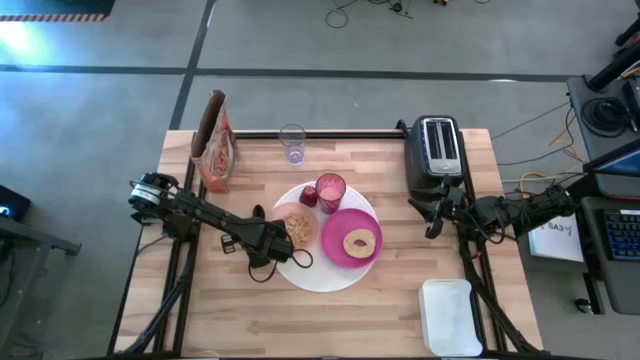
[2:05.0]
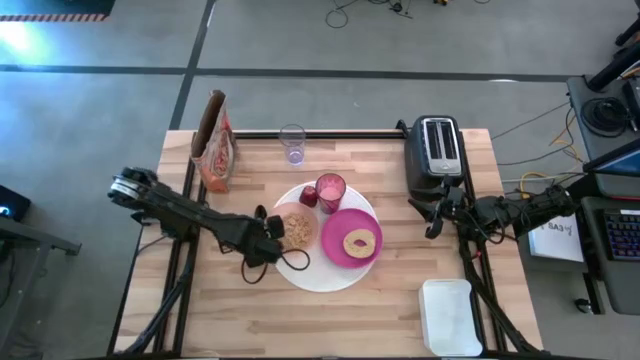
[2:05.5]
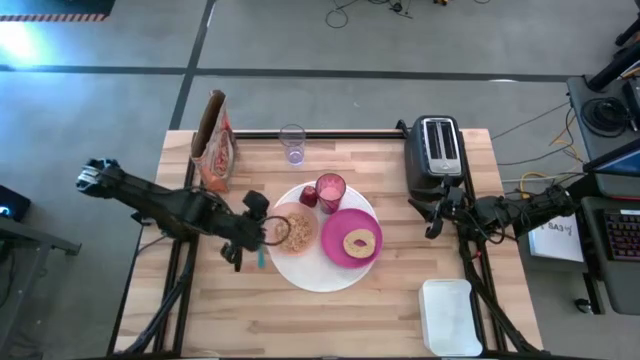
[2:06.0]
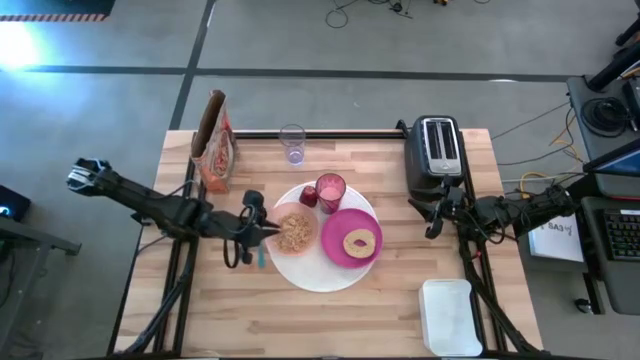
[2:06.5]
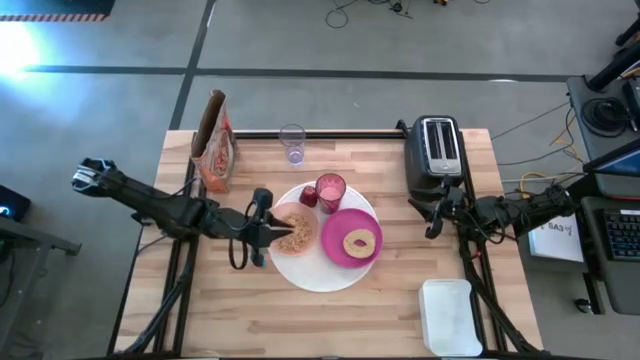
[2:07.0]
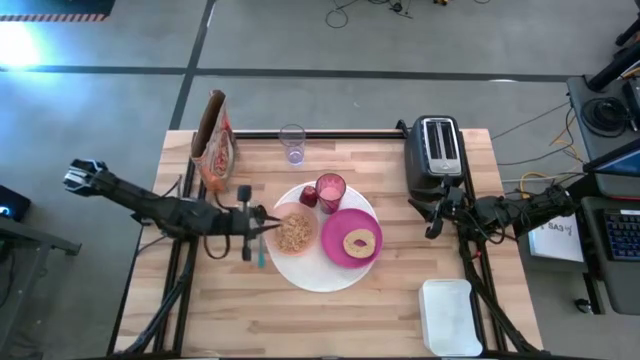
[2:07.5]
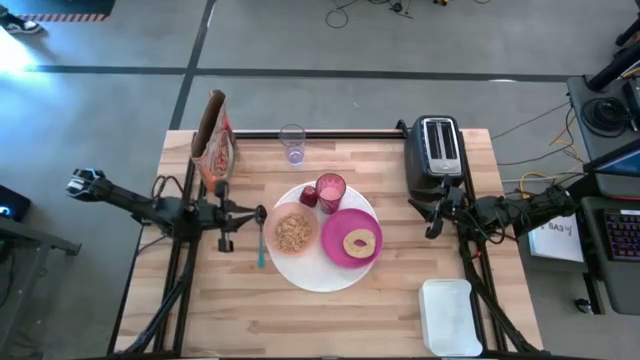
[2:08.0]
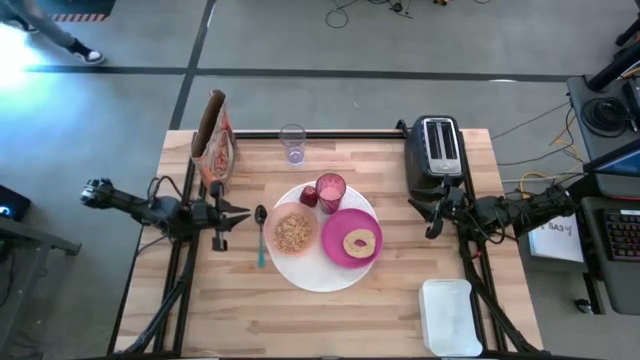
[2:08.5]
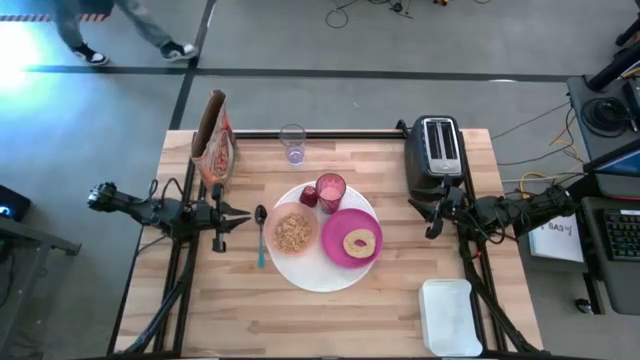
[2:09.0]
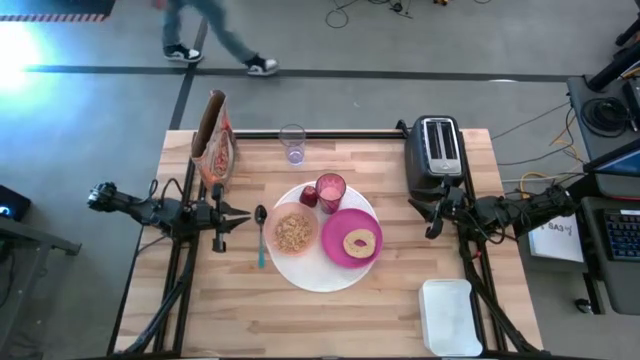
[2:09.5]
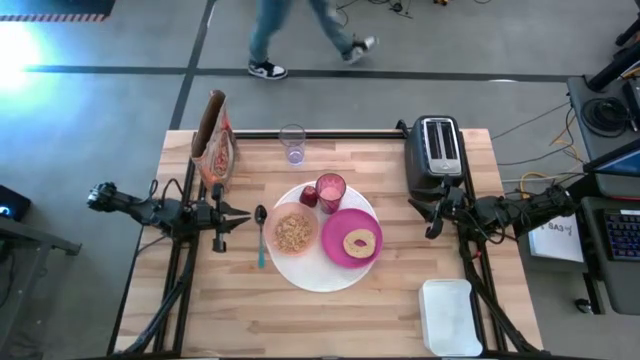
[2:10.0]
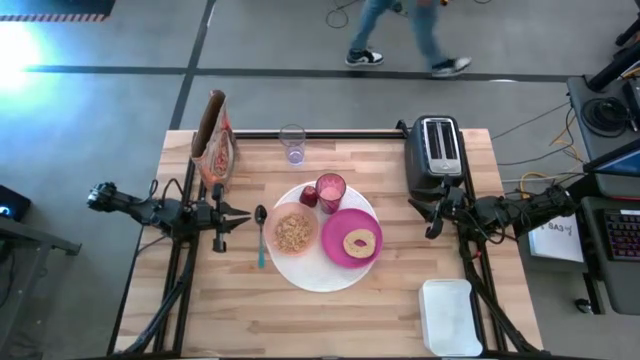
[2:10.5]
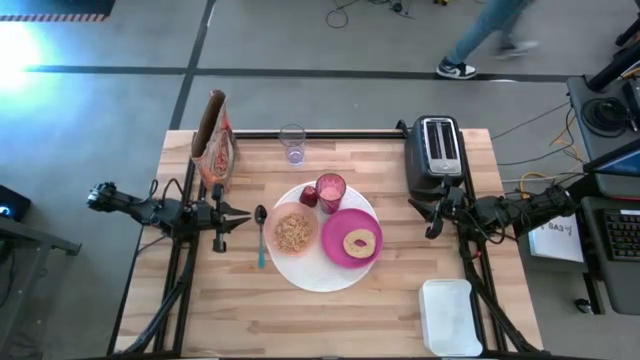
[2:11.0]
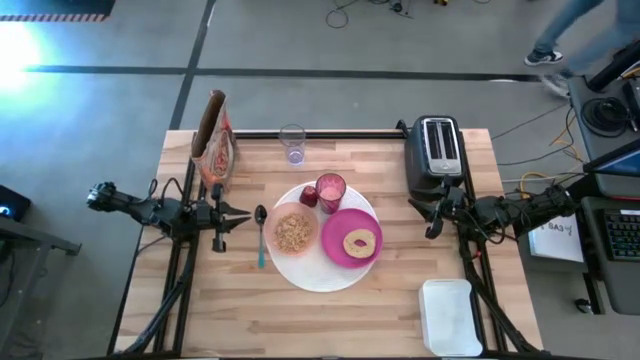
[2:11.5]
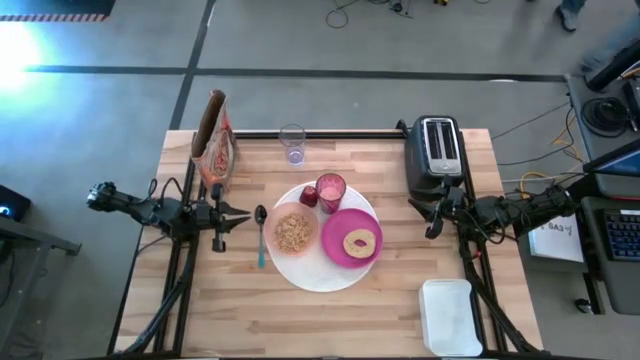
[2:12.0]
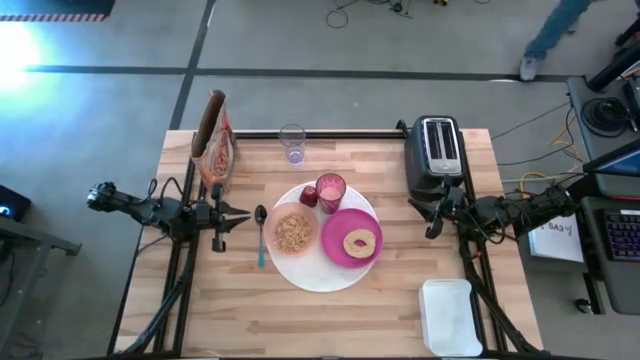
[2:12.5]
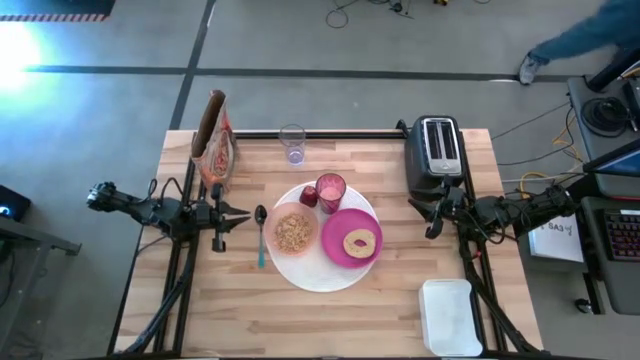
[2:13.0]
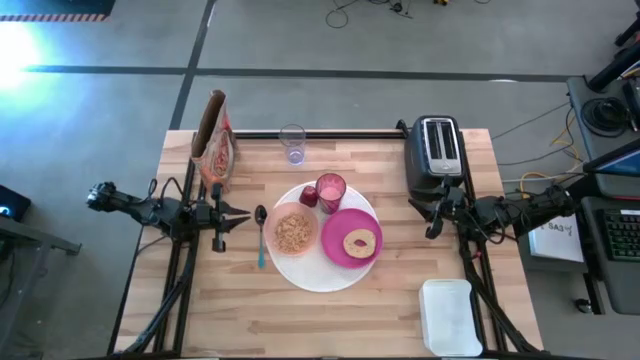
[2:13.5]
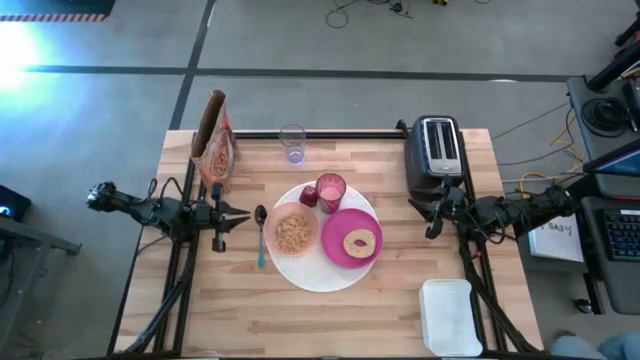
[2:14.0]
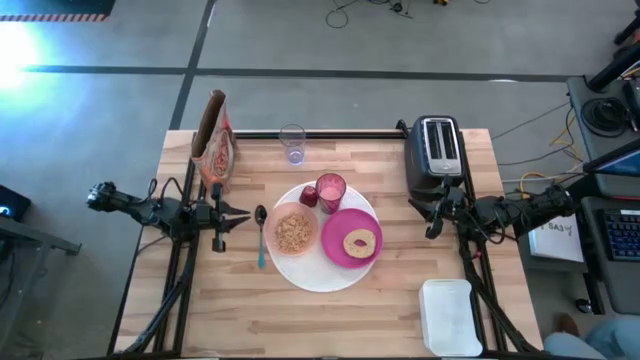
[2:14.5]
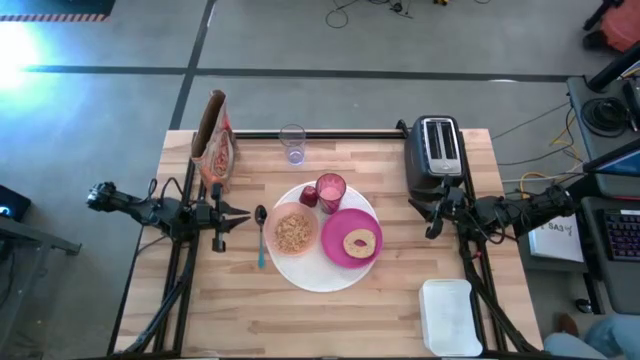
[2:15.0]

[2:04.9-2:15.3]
Task: Arrange a breakfast setting
Return to Home Position

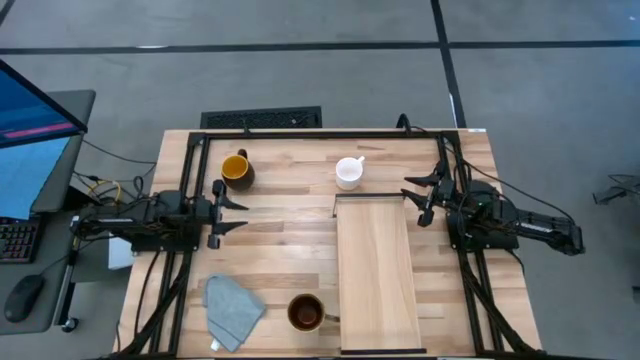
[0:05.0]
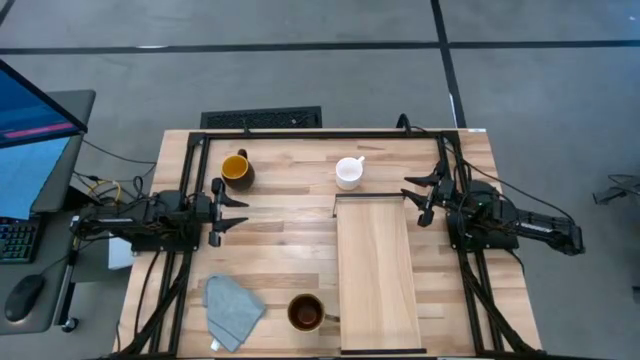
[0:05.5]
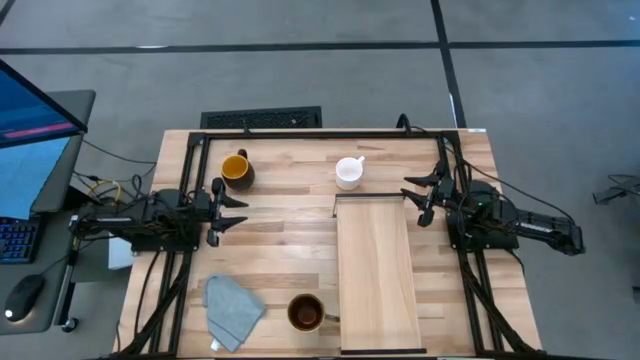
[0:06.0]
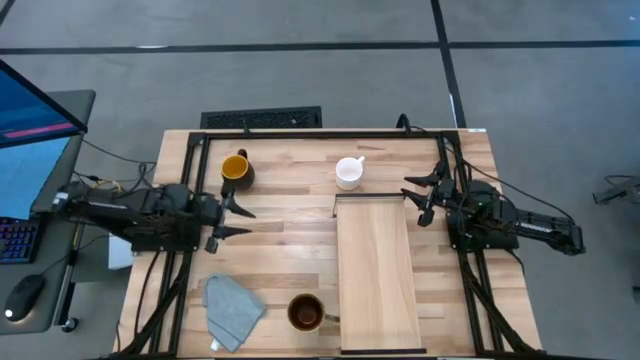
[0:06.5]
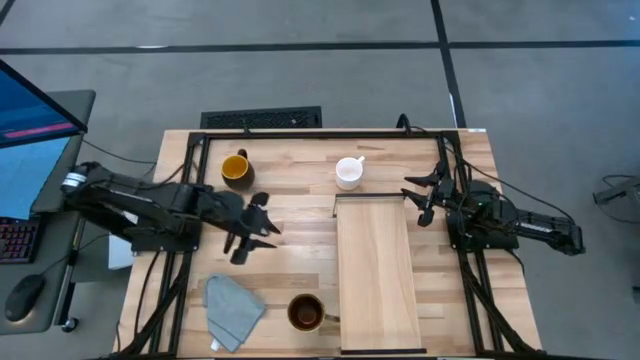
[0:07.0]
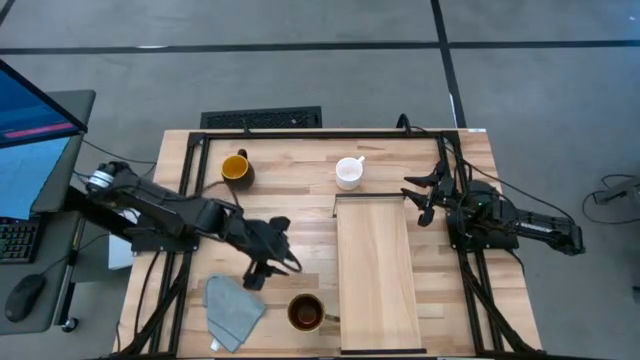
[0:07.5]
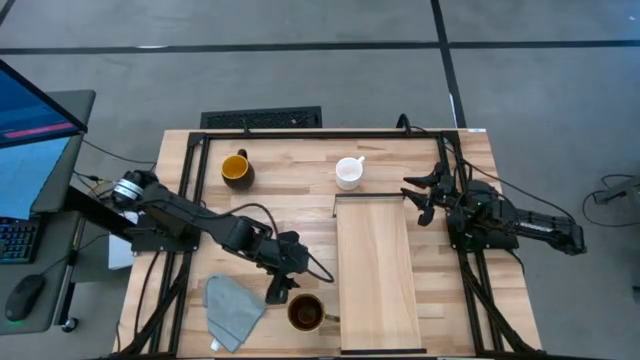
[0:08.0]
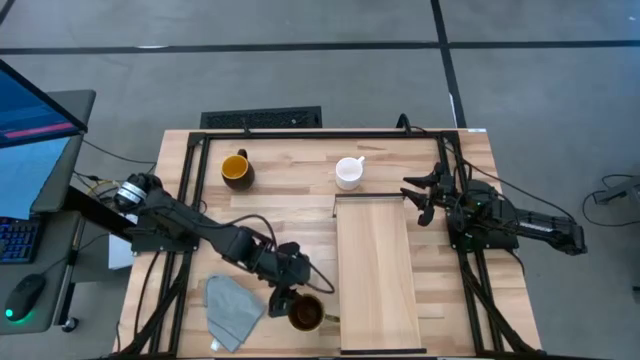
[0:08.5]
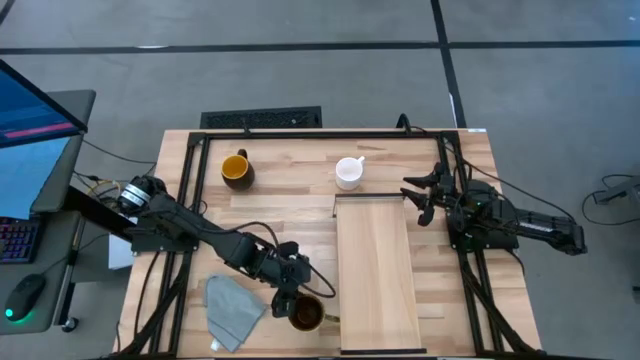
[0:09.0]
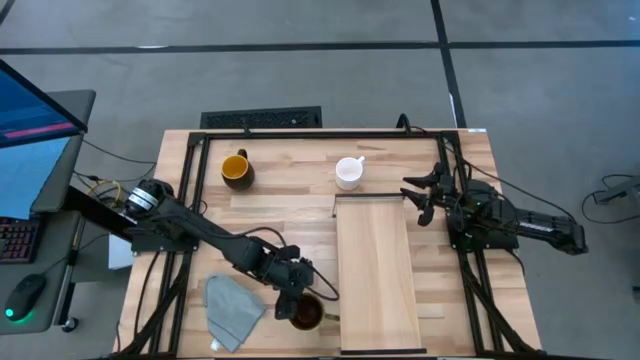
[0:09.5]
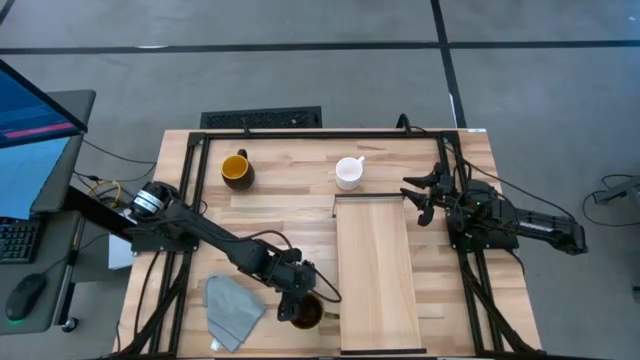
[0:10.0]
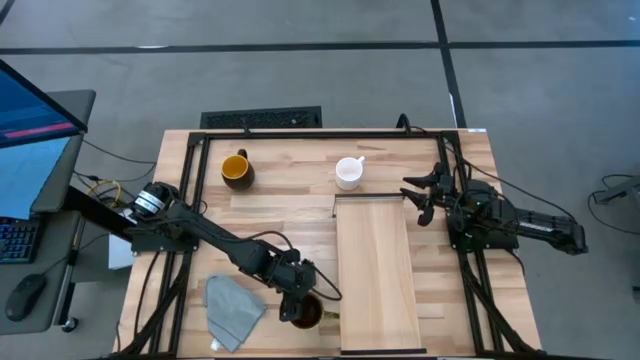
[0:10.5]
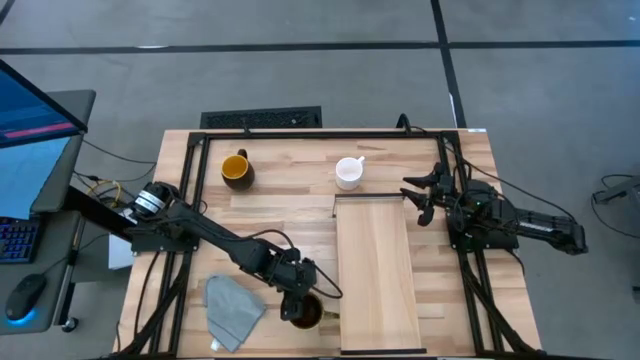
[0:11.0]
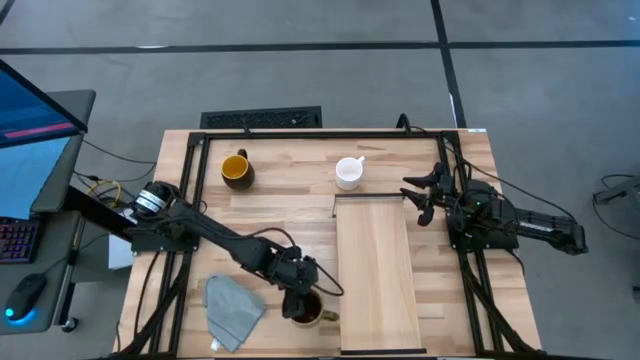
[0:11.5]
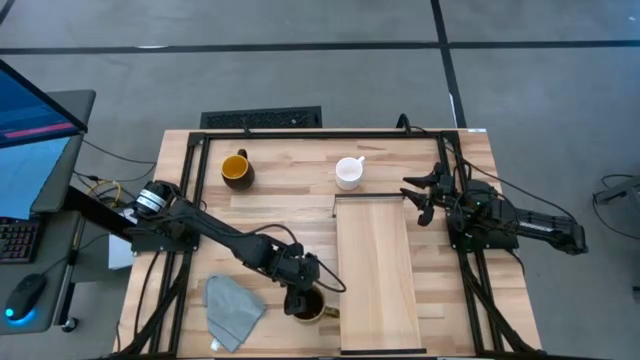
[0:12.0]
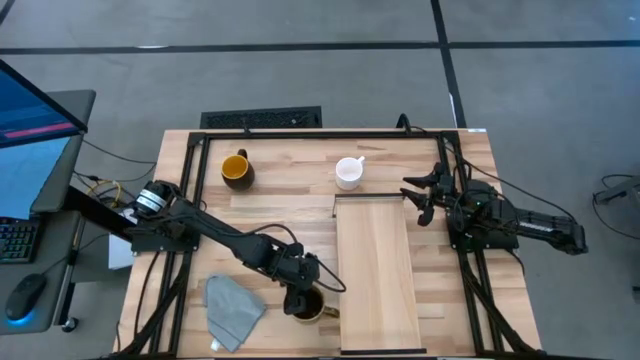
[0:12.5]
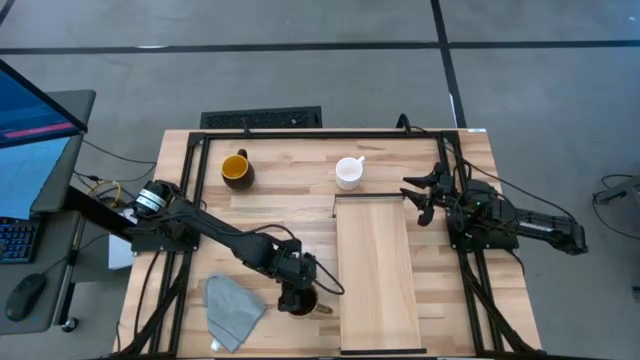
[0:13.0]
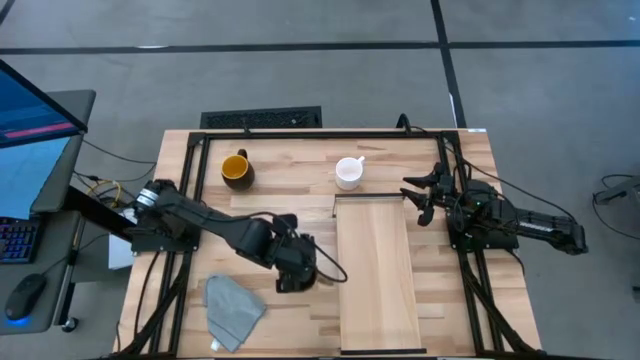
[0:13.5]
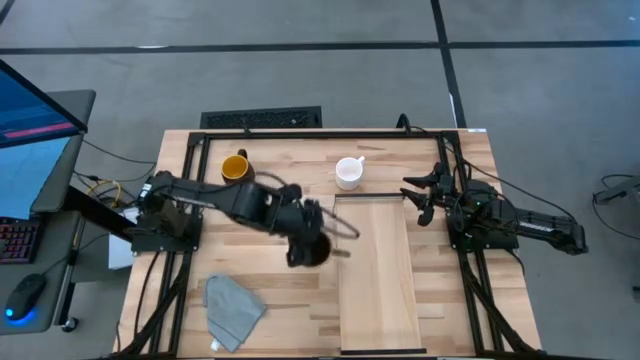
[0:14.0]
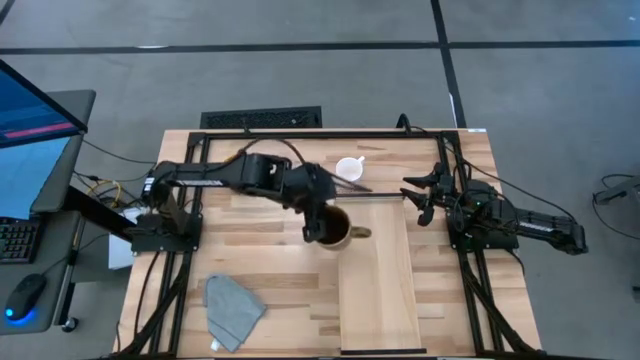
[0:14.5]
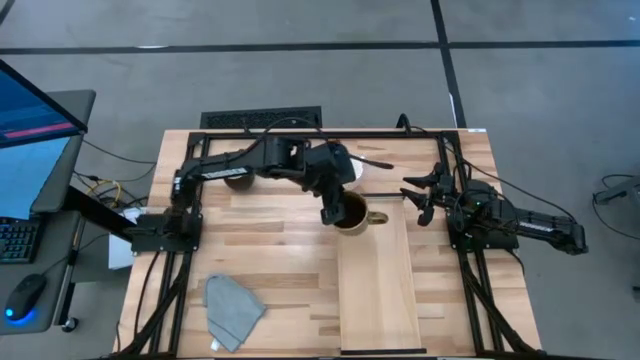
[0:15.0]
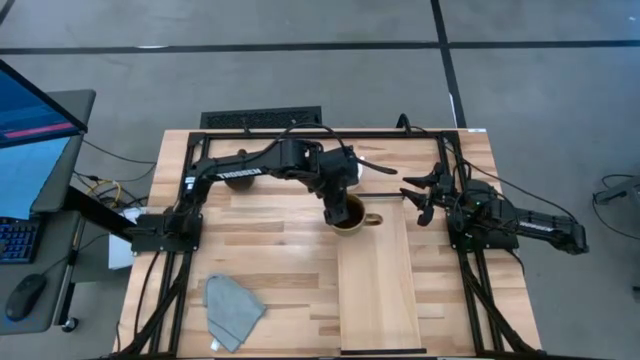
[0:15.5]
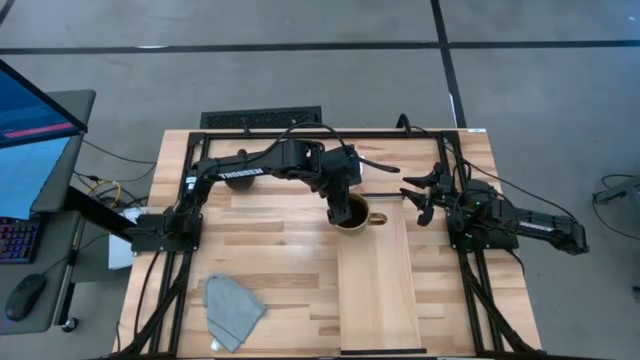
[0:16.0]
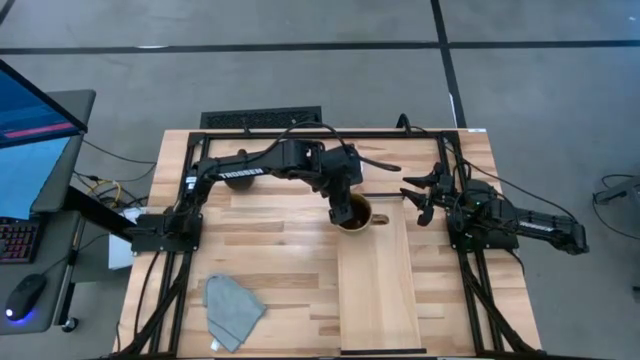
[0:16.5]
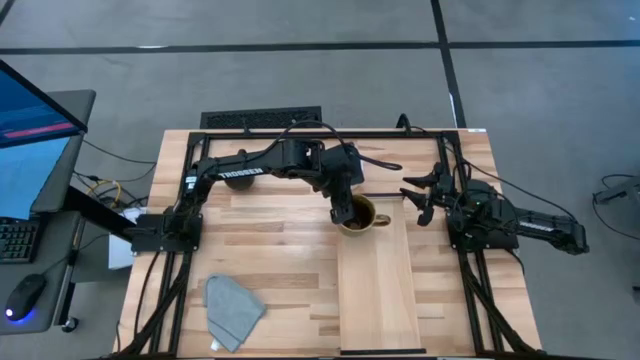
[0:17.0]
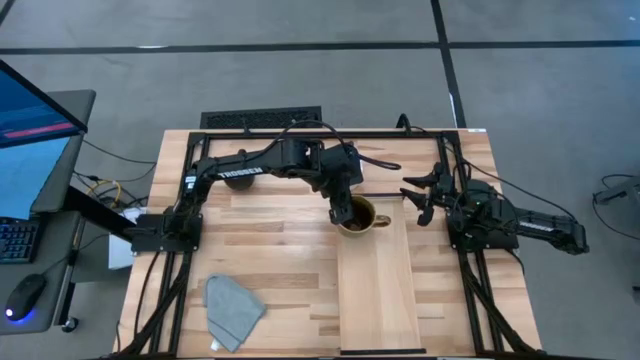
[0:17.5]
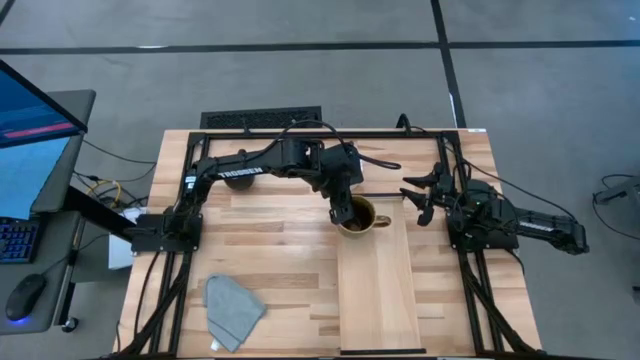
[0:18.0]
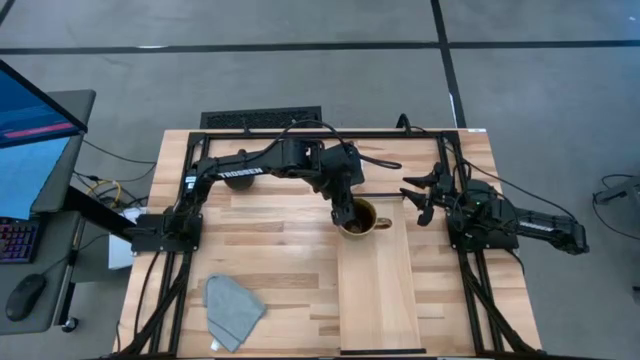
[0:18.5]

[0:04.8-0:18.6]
Task: Stack small to large cups/mugs on shelf
Put the blue mug on the shelf
